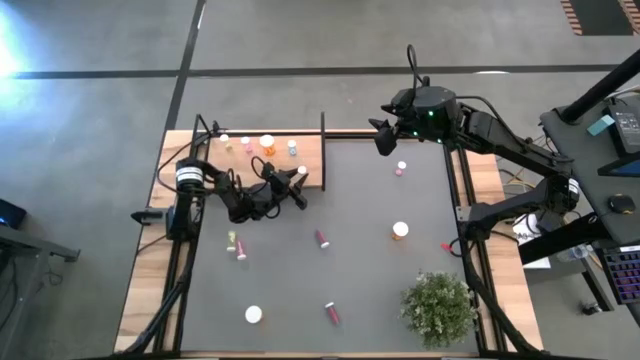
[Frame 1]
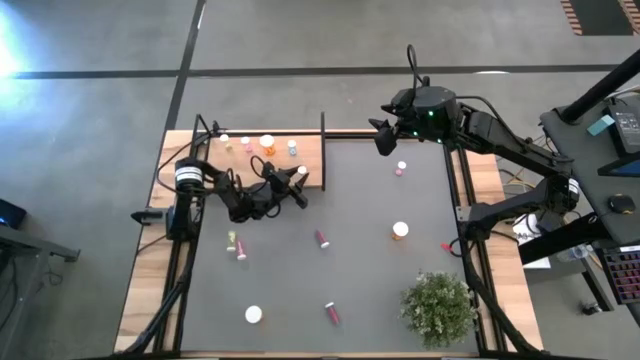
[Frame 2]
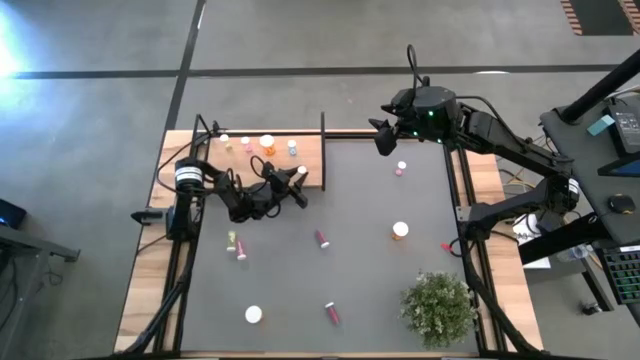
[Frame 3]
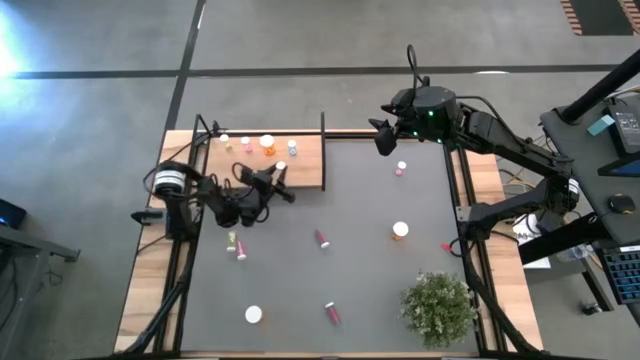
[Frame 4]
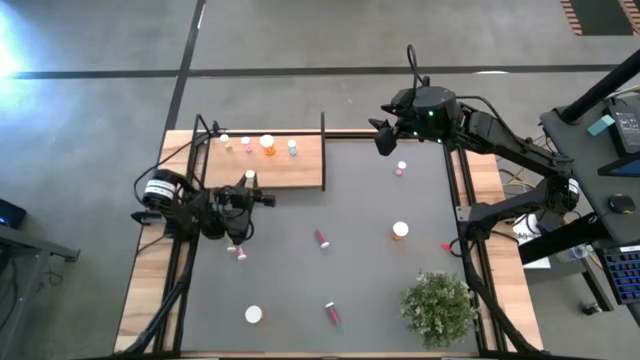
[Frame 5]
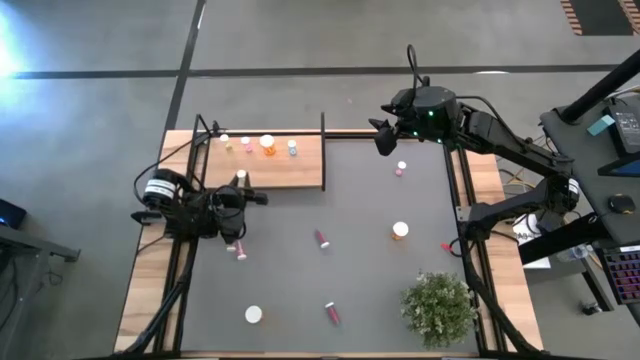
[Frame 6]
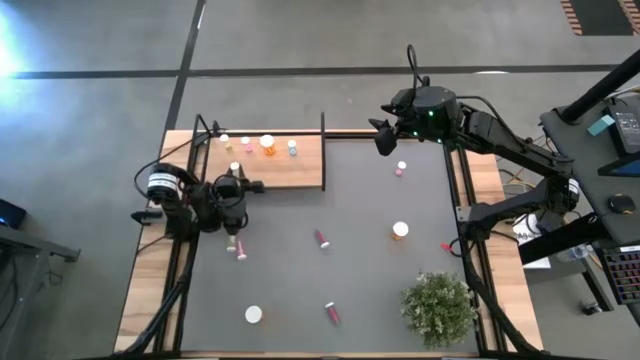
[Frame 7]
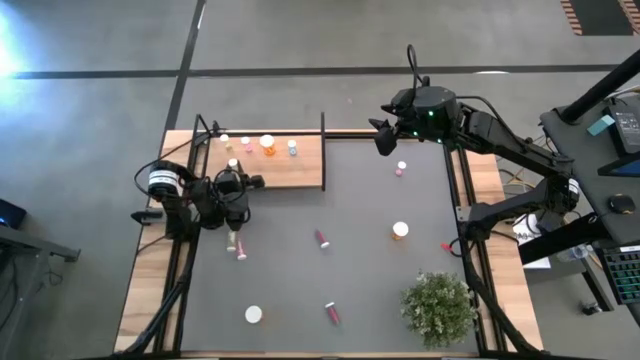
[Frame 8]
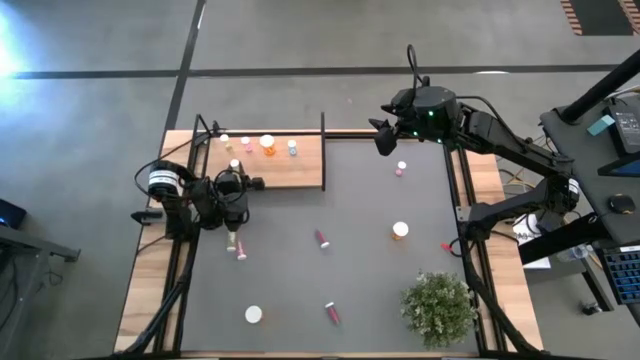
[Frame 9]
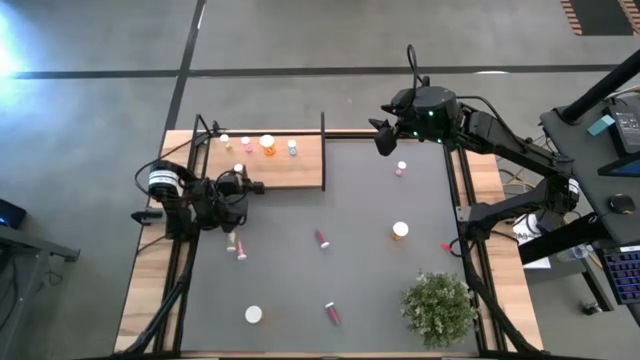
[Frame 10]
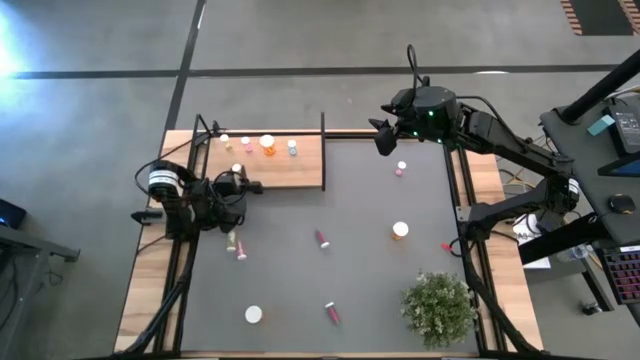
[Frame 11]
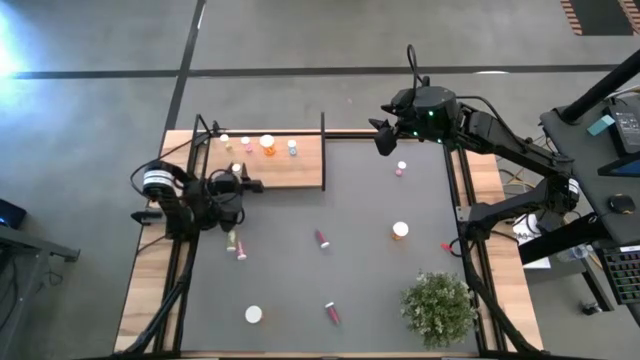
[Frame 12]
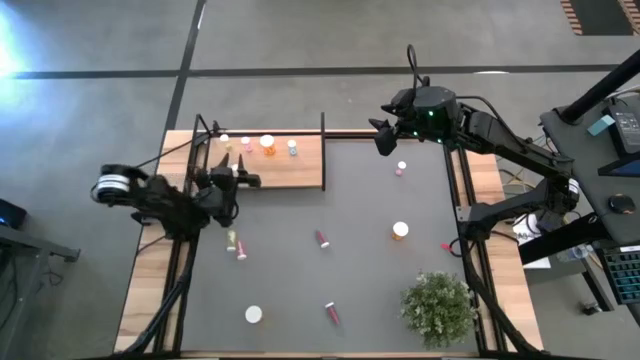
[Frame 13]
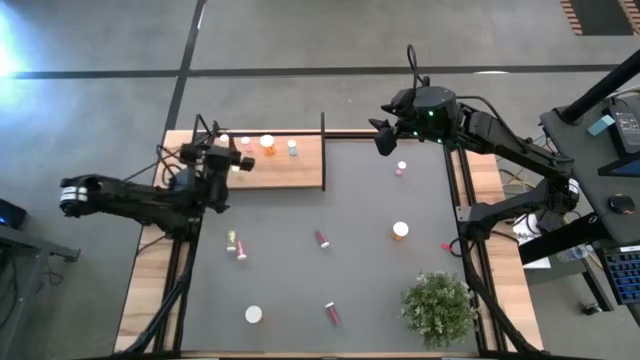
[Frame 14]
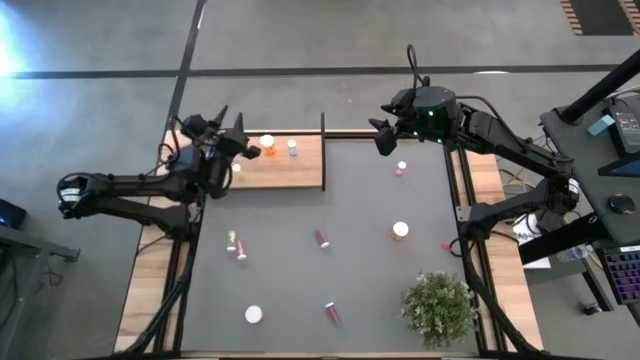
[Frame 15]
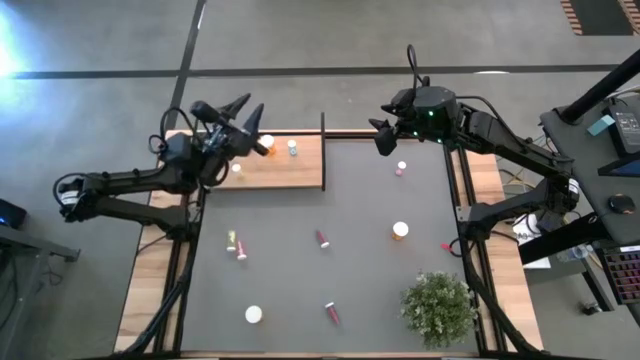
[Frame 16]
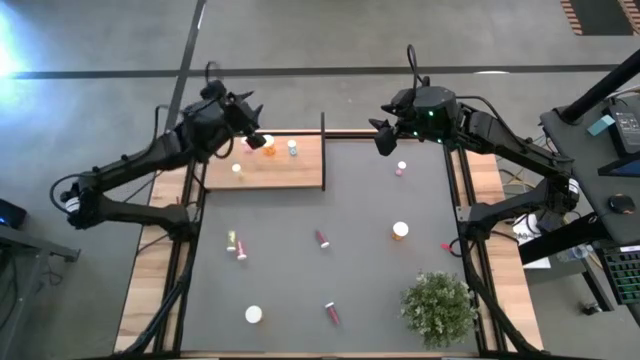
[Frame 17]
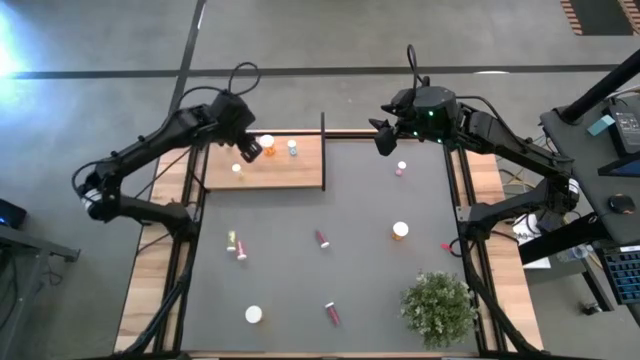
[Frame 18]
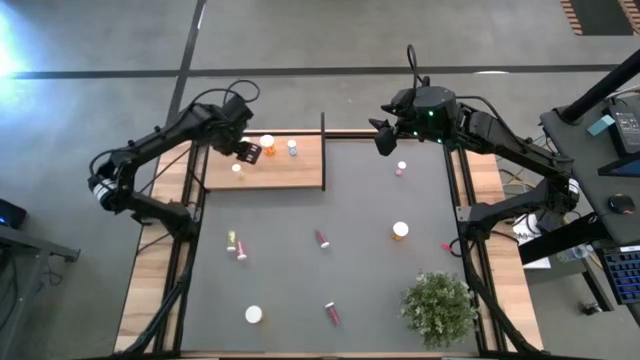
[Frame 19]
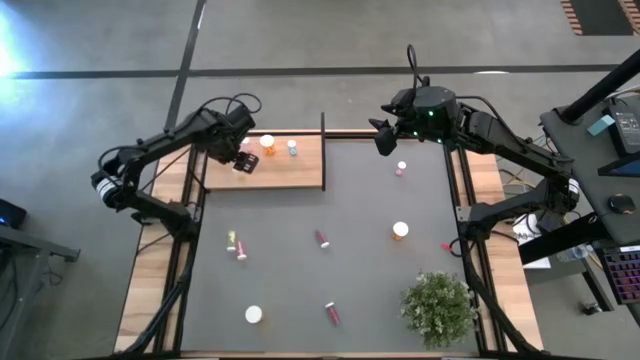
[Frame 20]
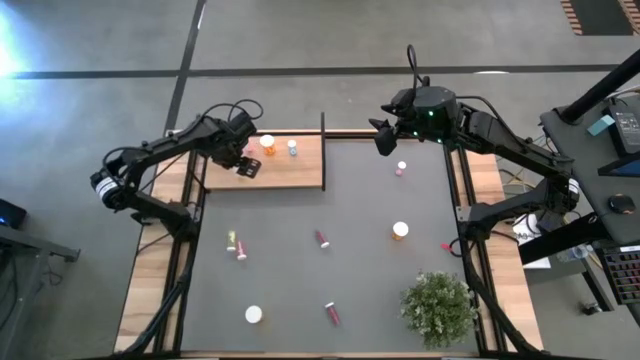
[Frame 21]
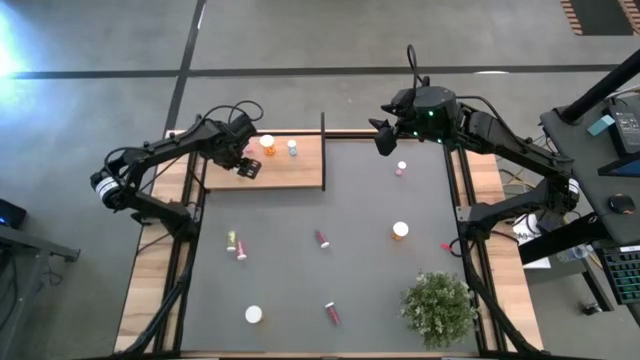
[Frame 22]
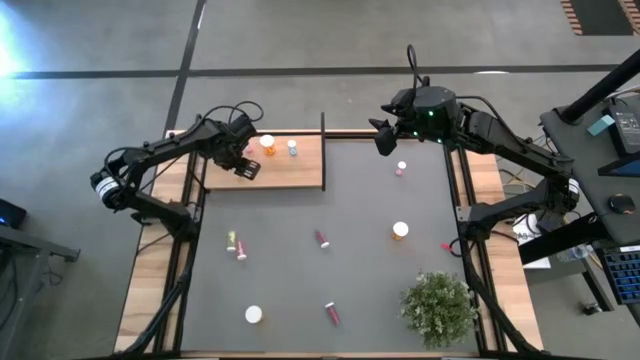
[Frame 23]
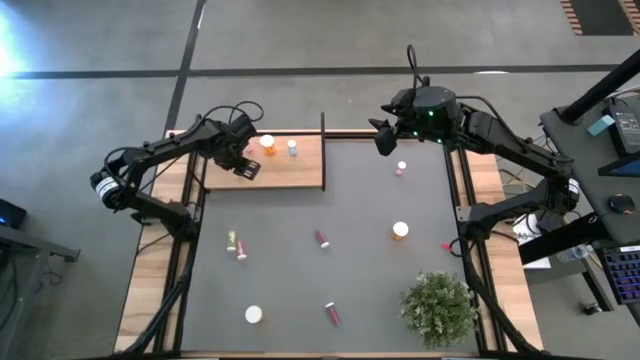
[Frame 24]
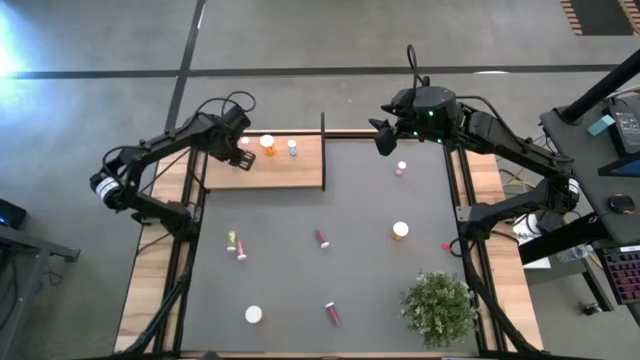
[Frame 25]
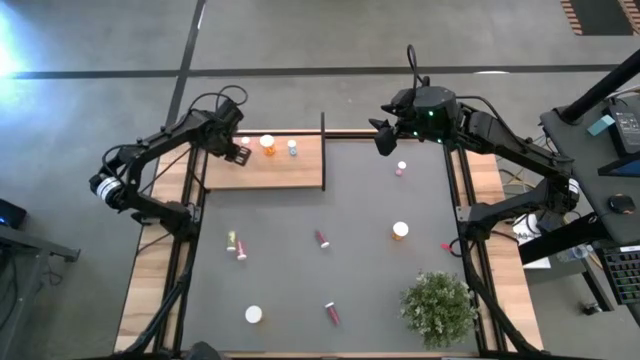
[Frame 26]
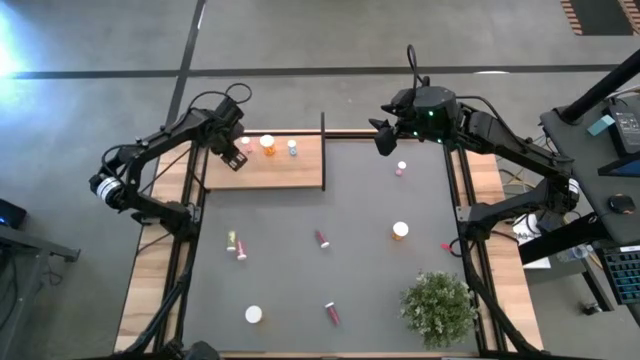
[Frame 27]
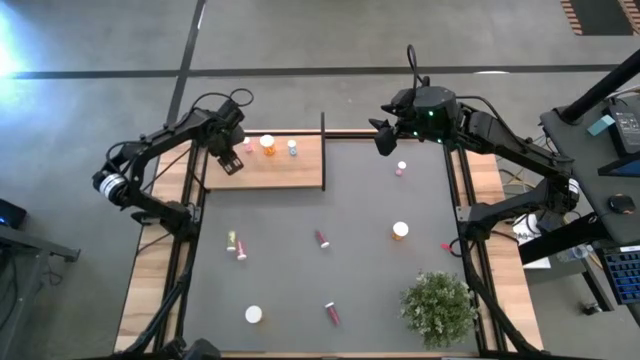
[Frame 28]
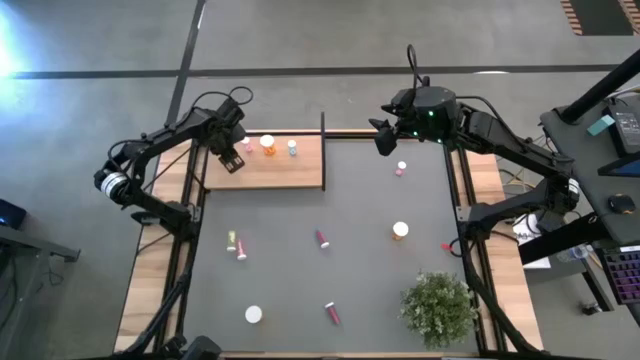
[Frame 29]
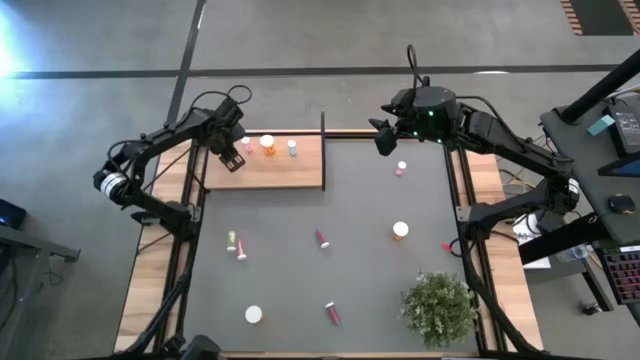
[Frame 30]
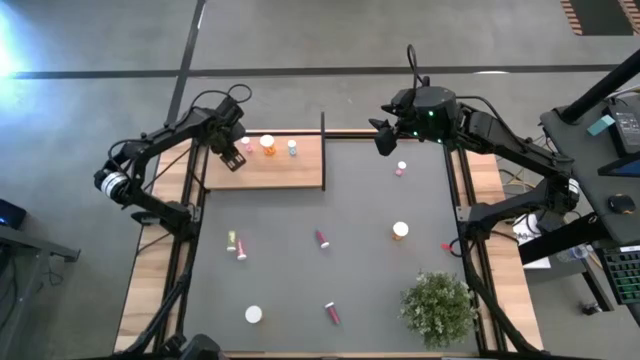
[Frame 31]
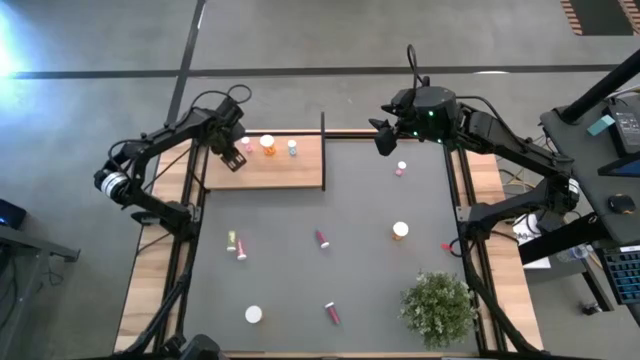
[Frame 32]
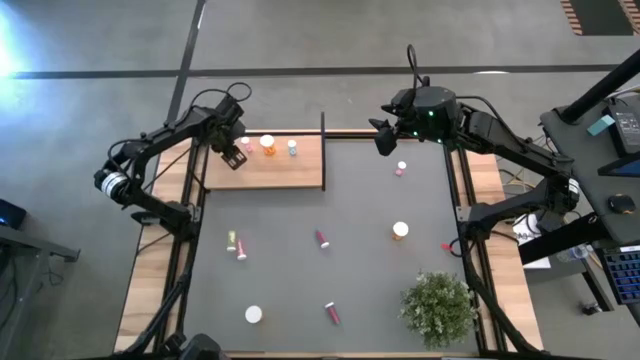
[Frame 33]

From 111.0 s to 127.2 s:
Task: Pick and place medicine bottles onto shelf by color
Put the right yellow pill bottle on the shelf aligned with the other yellow pill bottle

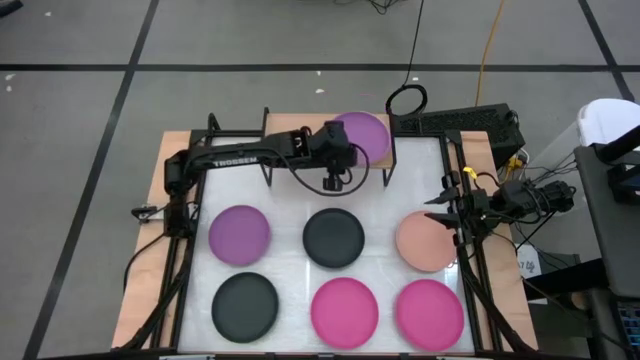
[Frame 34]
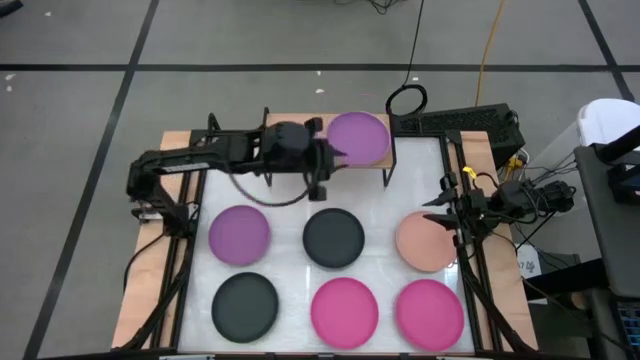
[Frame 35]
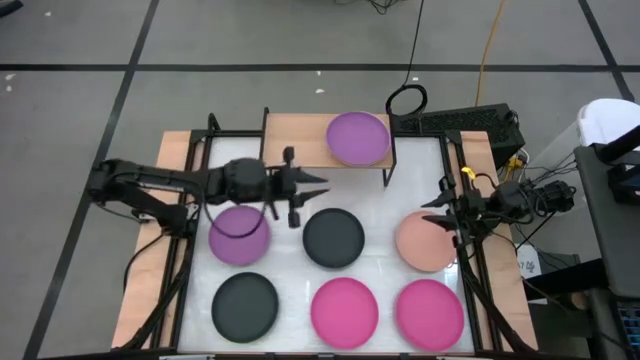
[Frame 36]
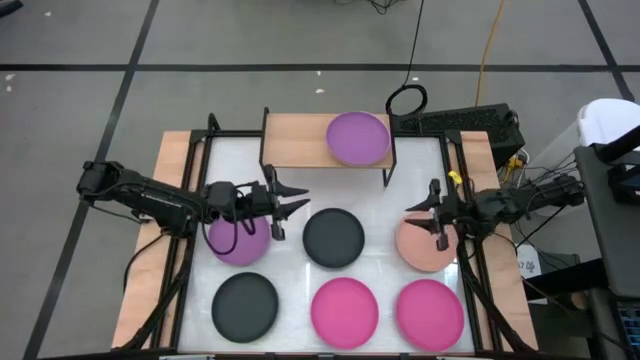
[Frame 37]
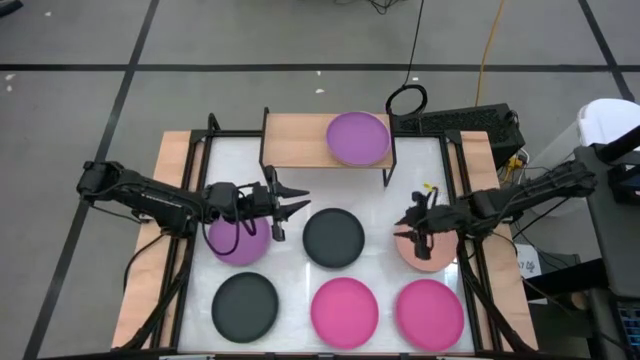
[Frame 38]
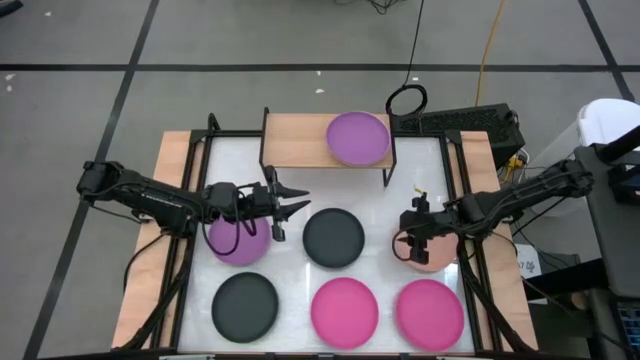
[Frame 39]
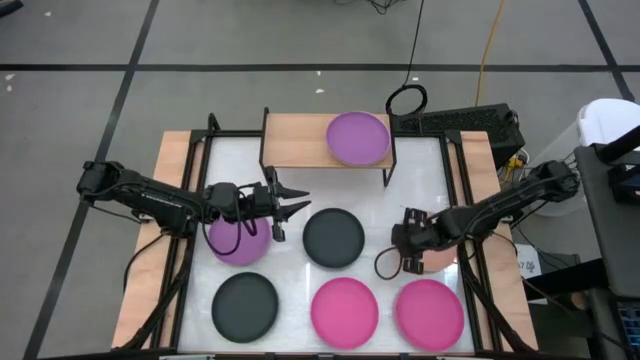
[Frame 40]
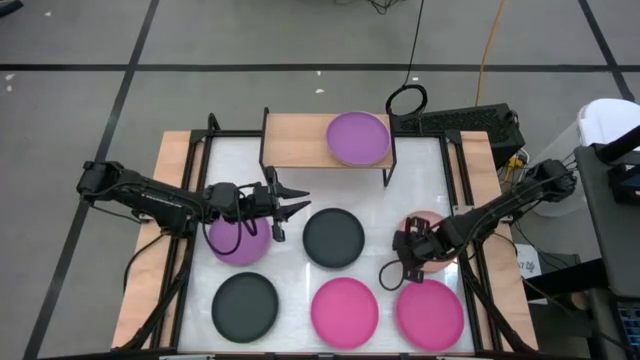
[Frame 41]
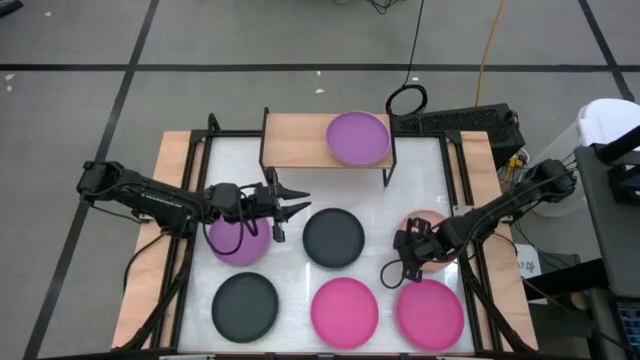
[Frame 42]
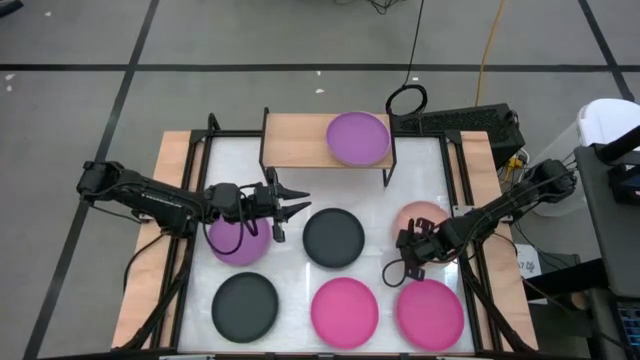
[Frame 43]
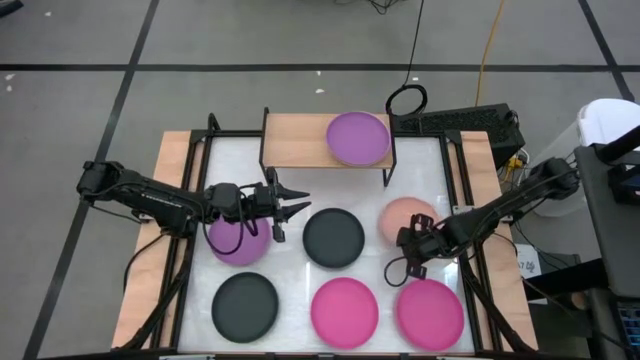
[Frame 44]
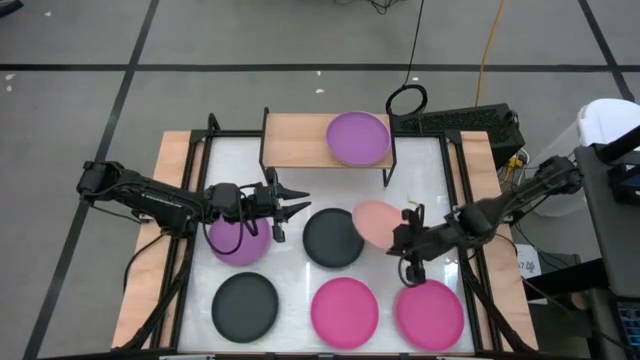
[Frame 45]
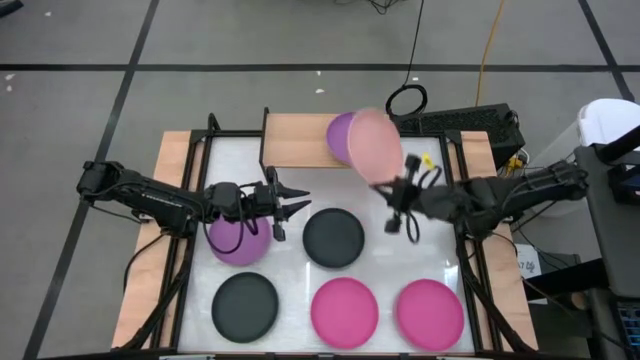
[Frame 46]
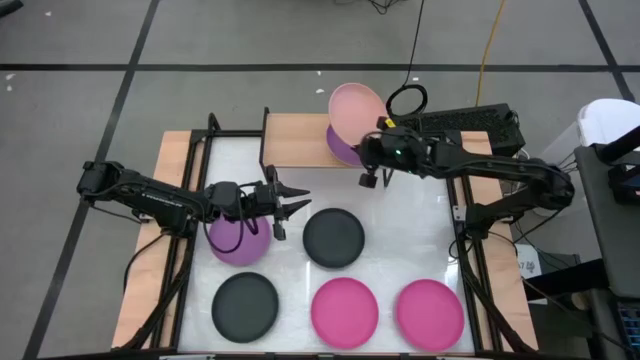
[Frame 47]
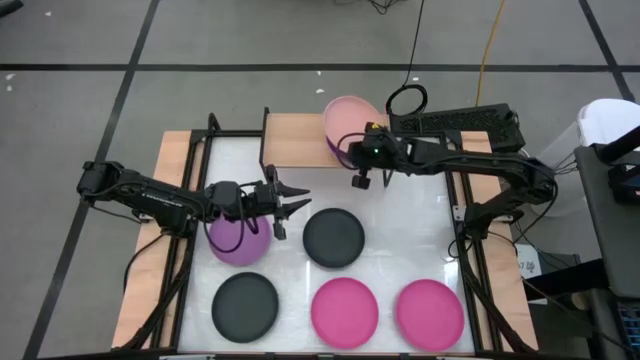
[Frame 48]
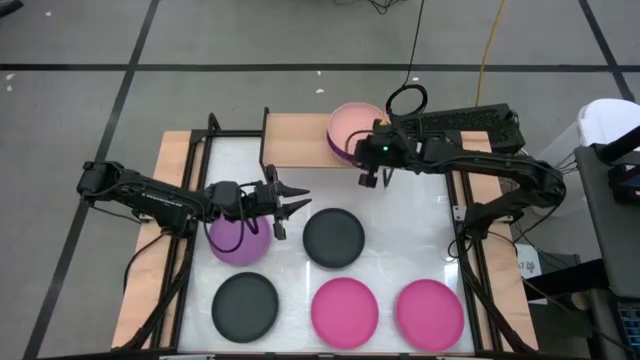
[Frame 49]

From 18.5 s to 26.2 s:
Task: Place and stack plates onto a shelf
Stack the orange plate on top of the purple plate on the shelf
